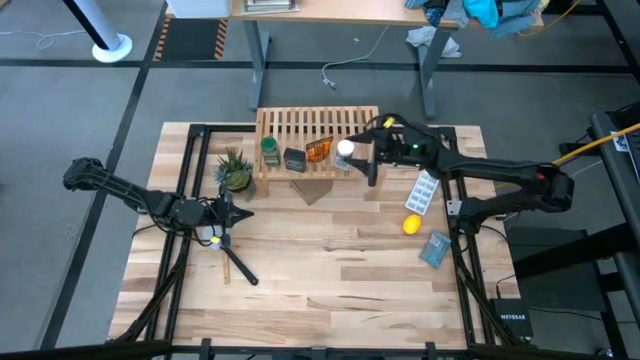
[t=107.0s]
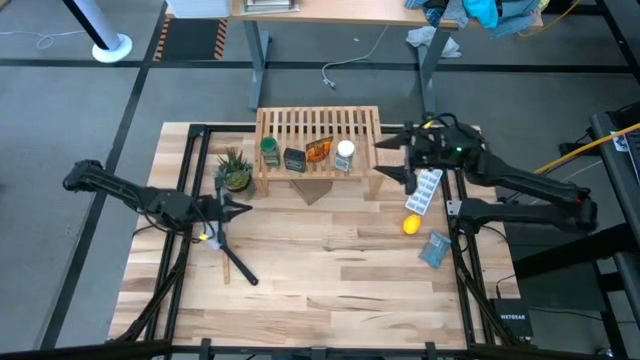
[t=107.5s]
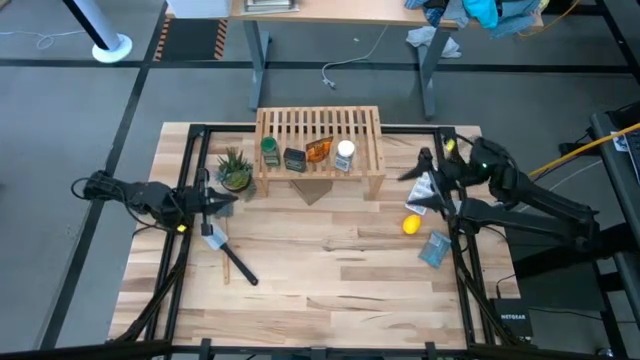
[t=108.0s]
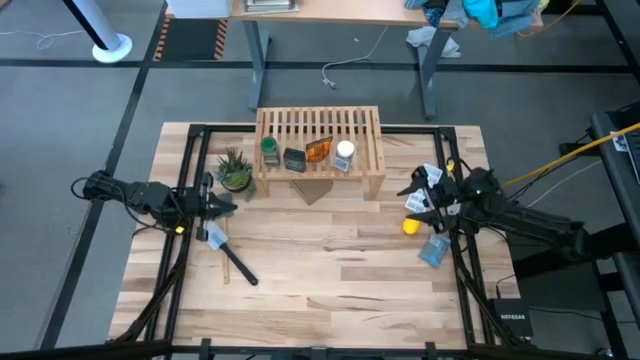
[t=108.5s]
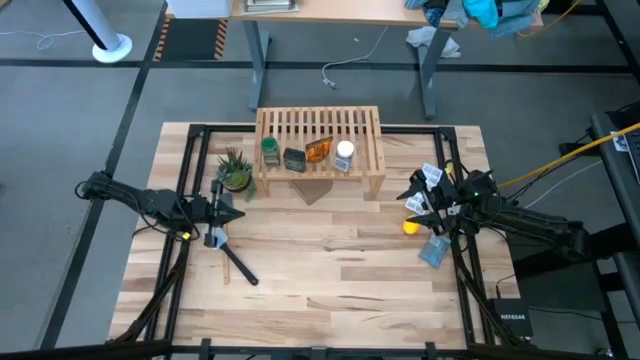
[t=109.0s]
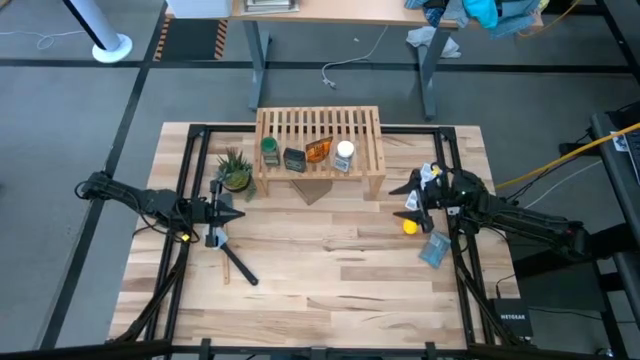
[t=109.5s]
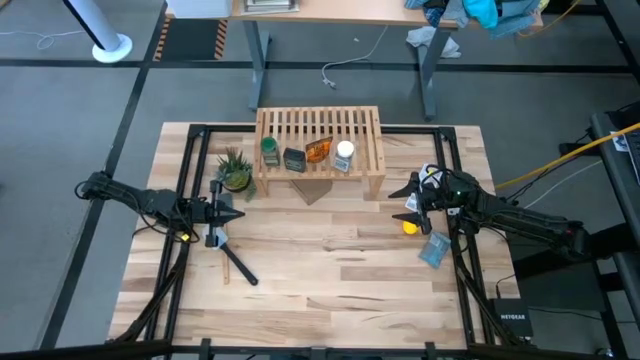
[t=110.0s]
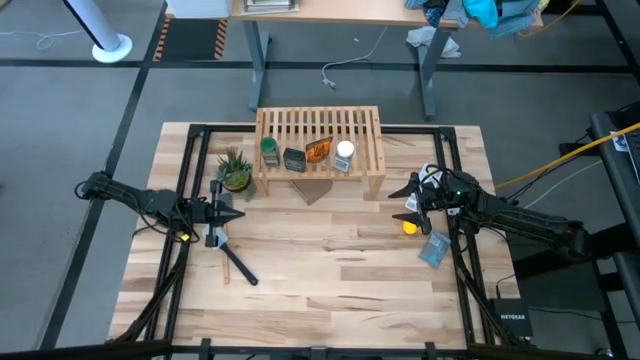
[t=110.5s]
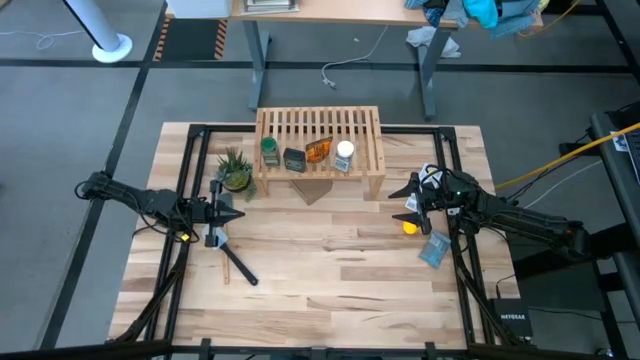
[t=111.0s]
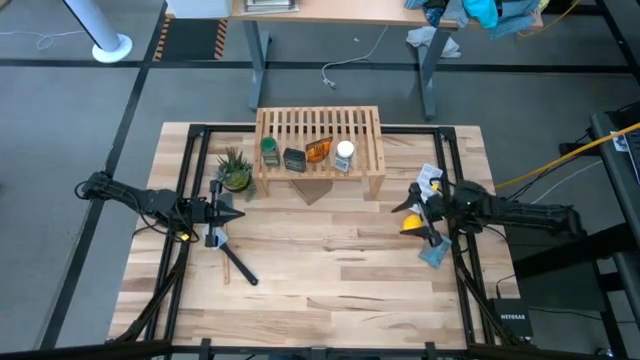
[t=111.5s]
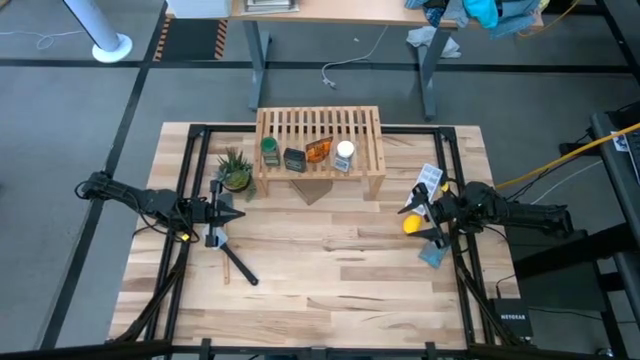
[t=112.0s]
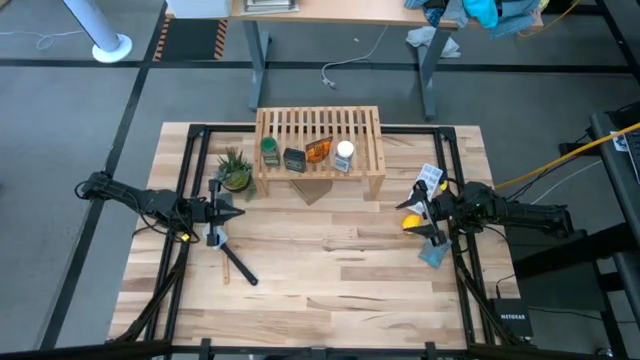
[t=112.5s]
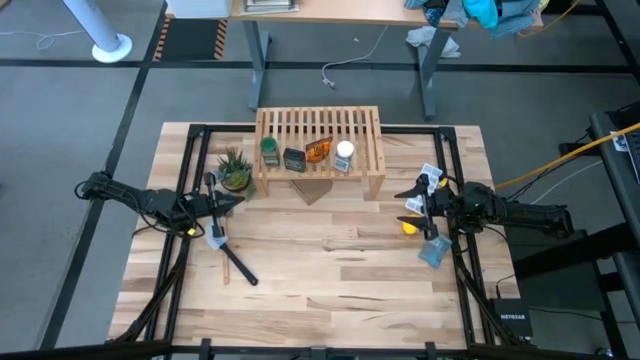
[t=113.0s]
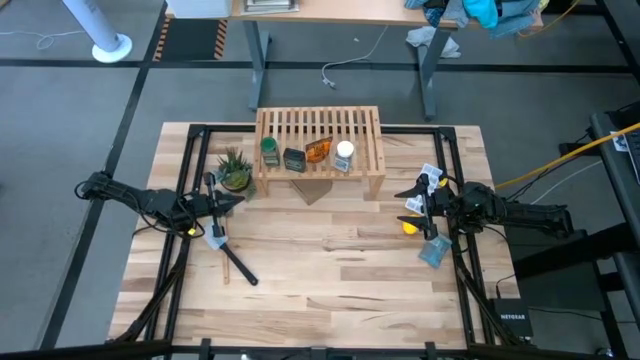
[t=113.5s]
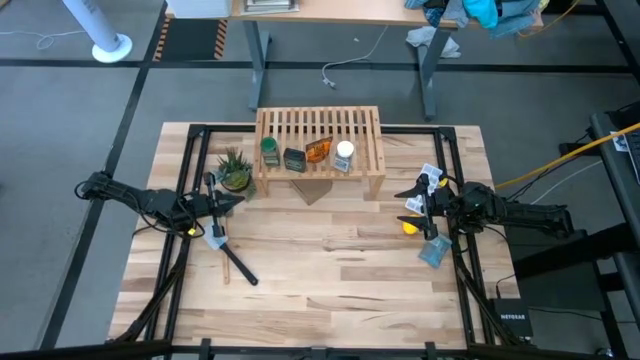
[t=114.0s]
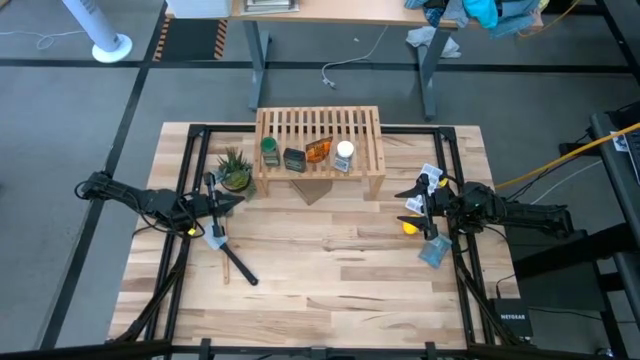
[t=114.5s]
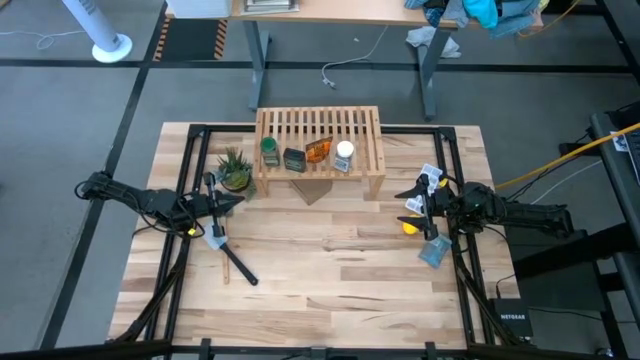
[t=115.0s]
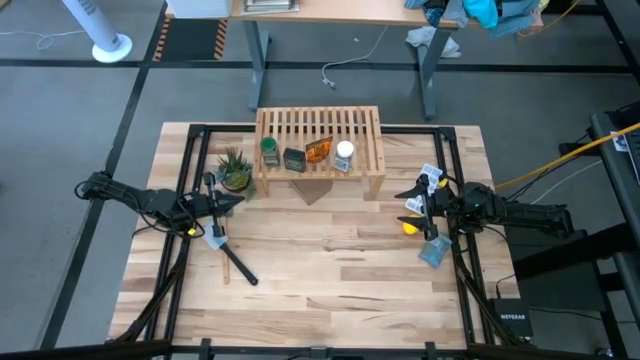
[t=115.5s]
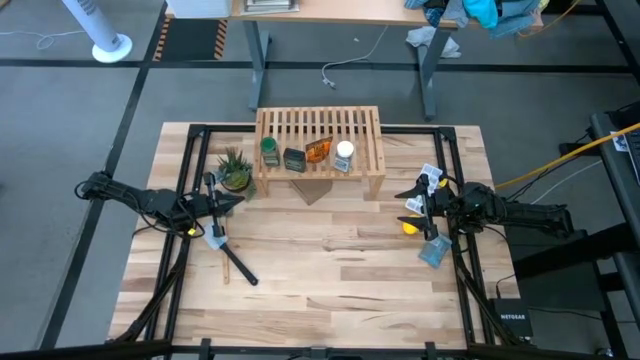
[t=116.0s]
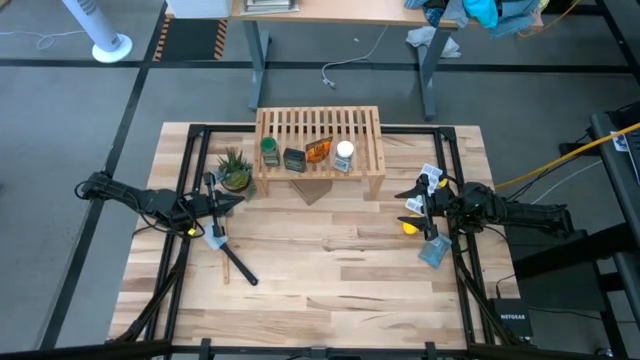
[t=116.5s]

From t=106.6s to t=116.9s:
Task: Shelf spices
Return to Home Position

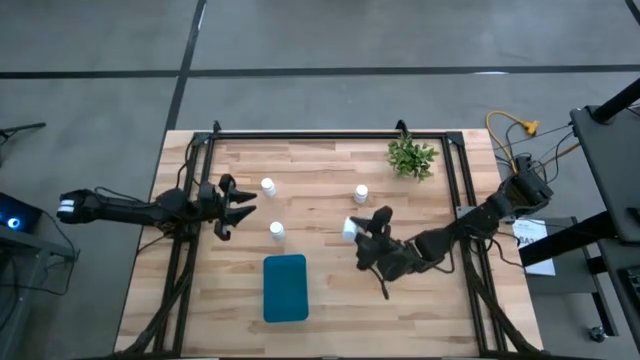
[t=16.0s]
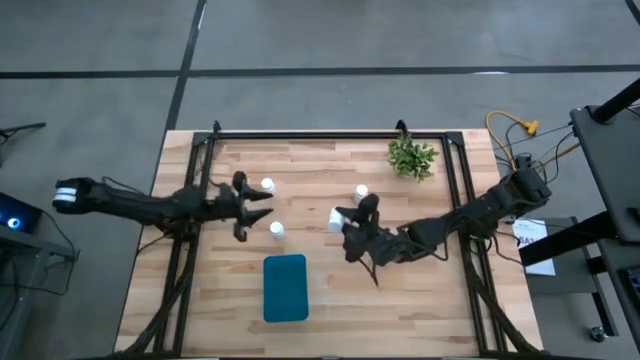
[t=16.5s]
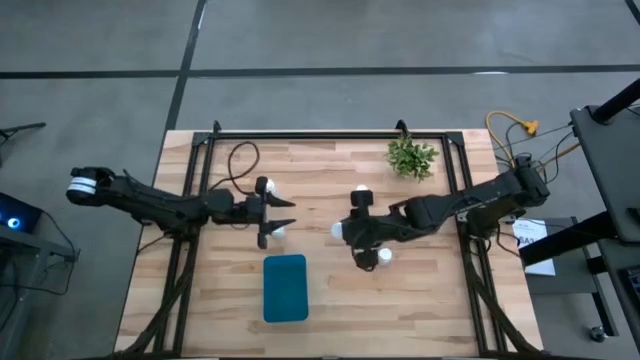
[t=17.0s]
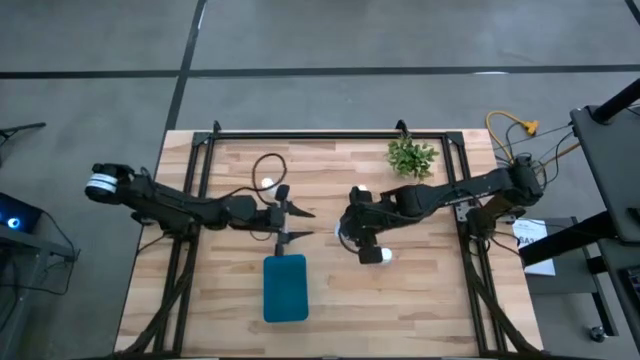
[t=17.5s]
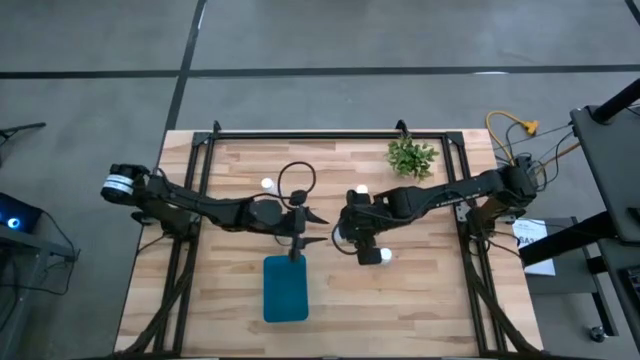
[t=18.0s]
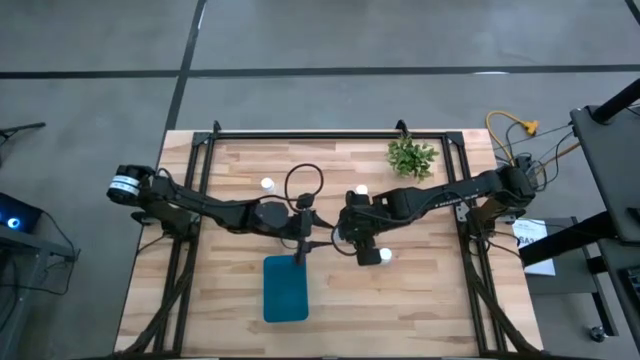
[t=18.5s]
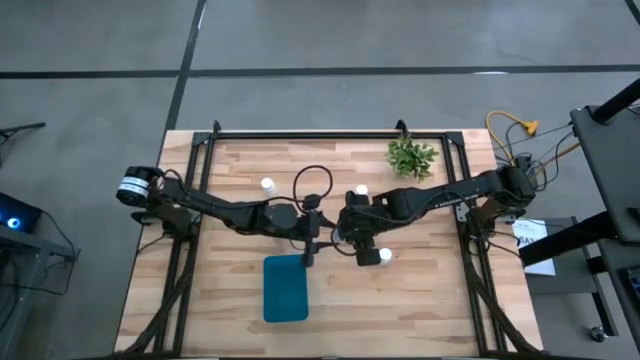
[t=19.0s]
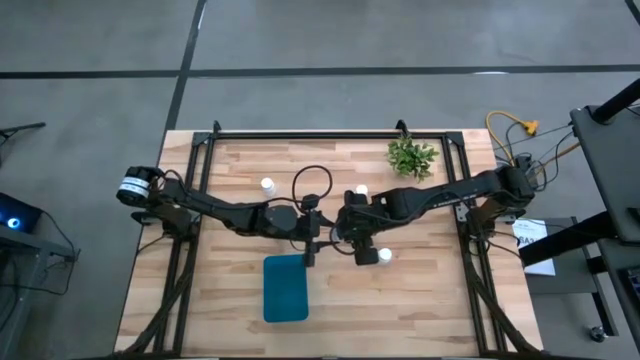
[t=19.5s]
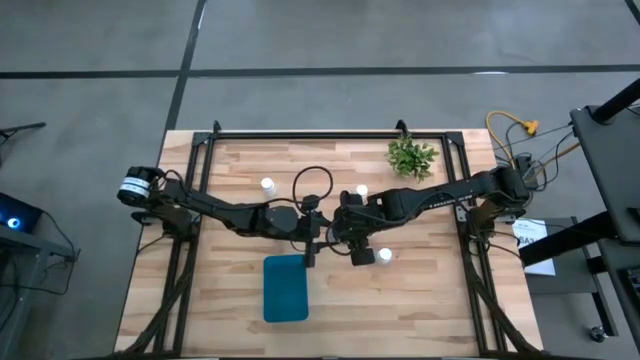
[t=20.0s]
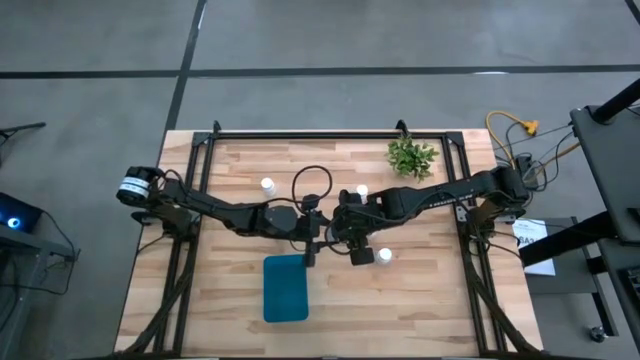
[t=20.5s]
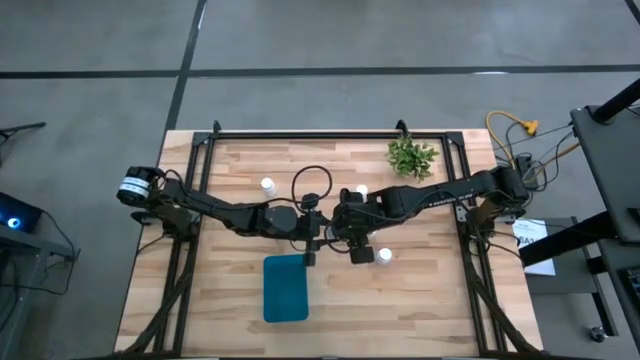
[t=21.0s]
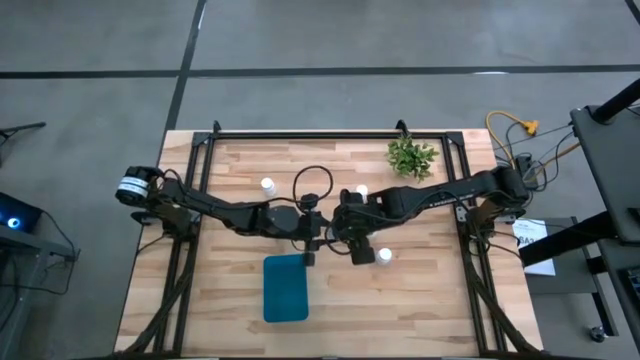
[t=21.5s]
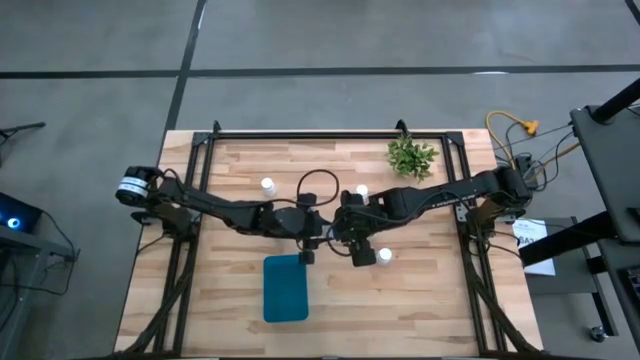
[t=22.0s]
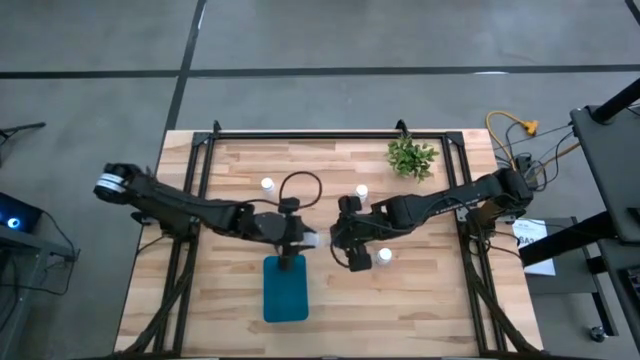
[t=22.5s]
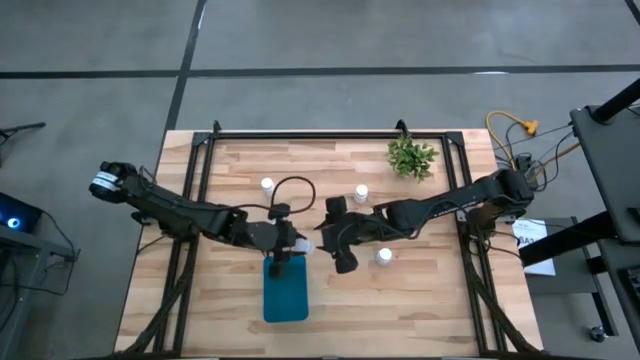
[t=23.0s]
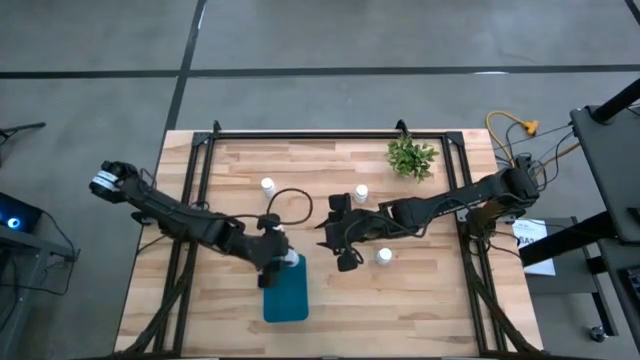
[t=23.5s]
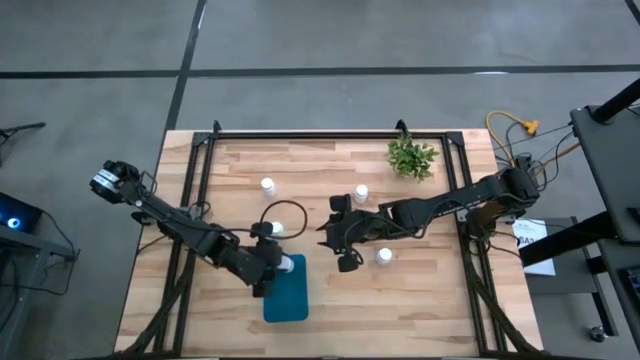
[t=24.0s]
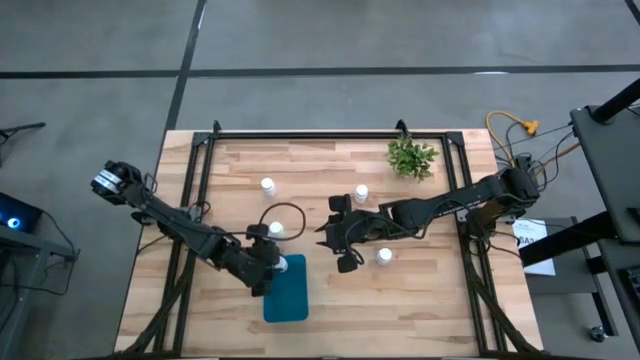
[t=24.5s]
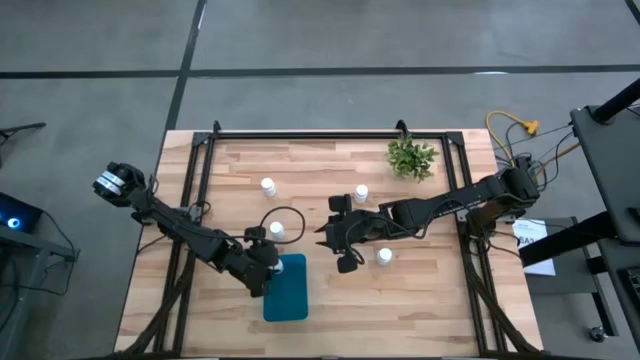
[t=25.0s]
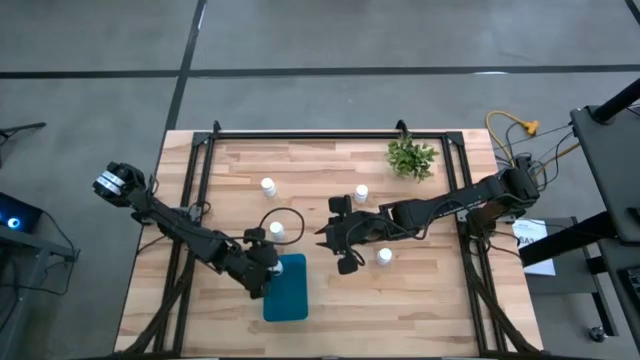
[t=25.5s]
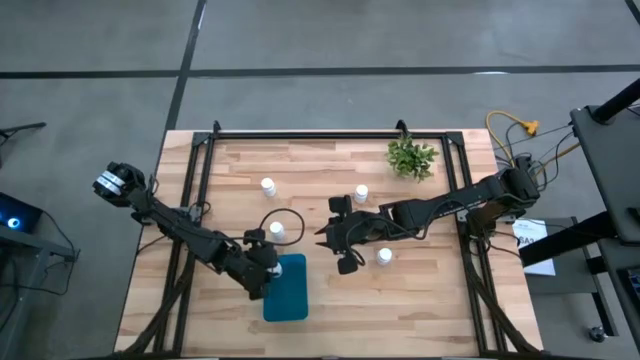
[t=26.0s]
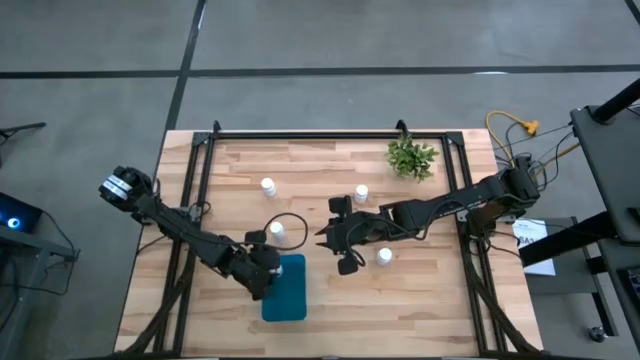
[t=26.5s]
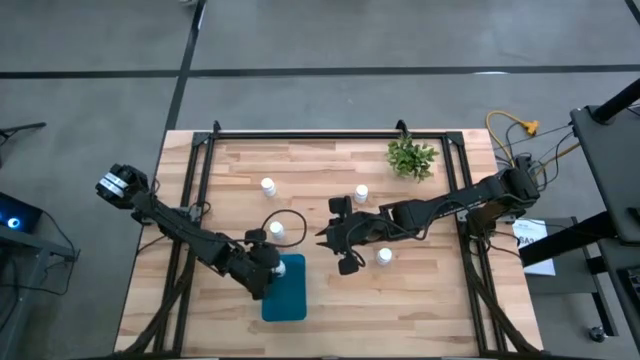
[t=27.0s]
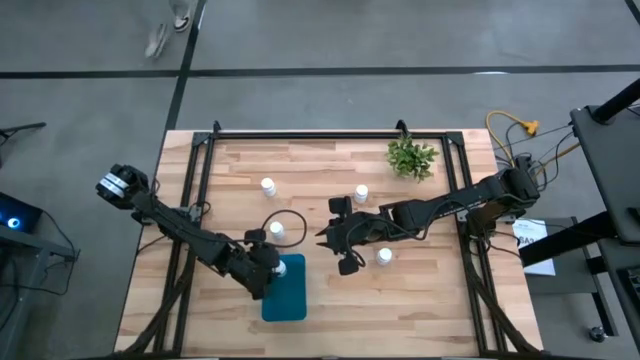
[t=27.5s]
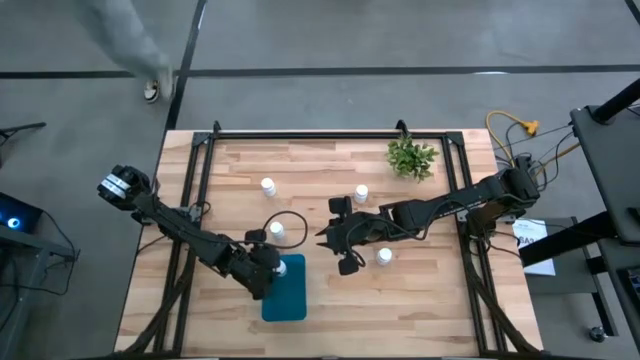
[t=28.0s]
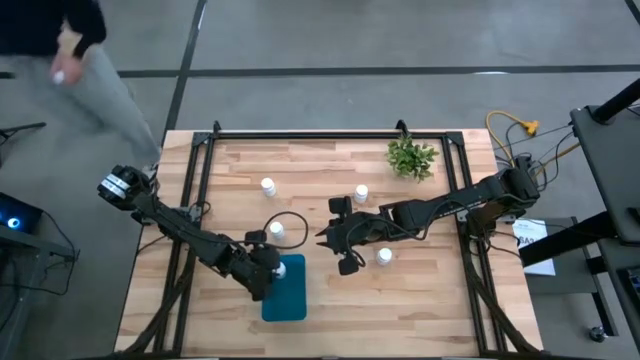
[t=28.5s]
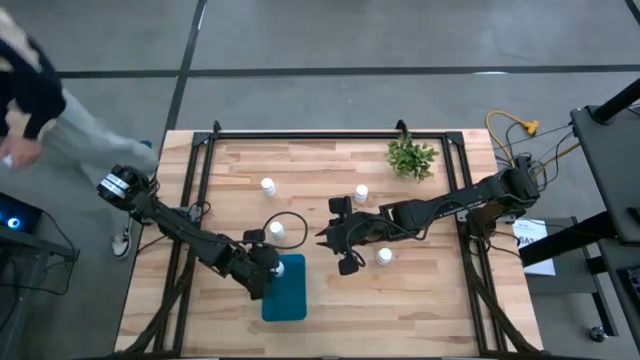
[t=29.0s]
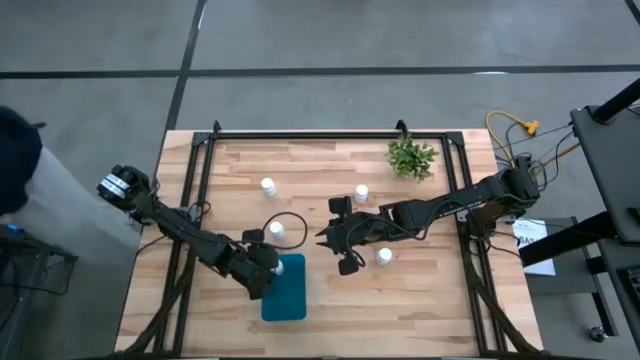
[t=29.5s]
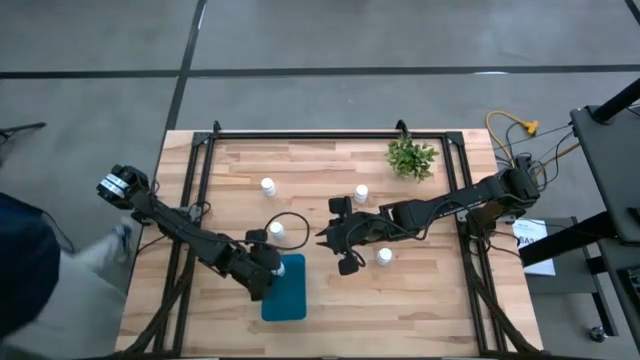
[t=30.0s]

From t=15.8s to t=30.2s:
Task: Pick and place pill bottles into a basket
Put the white pill bottle into the blue bin
